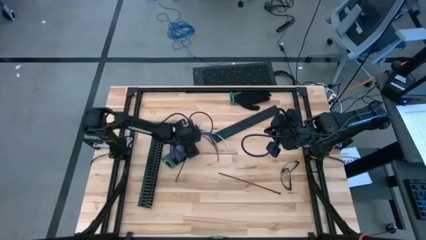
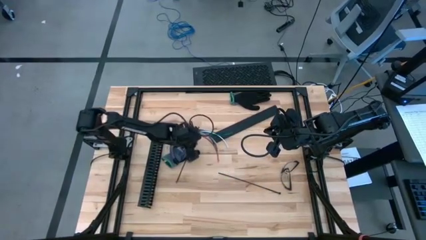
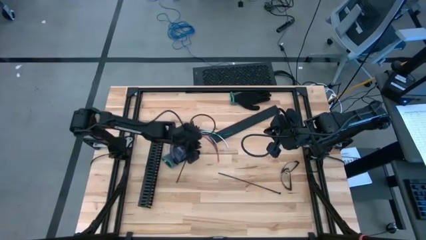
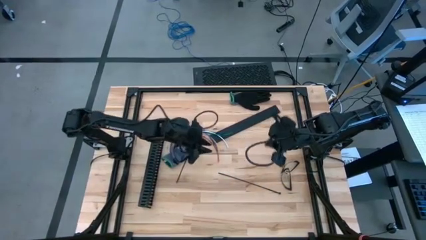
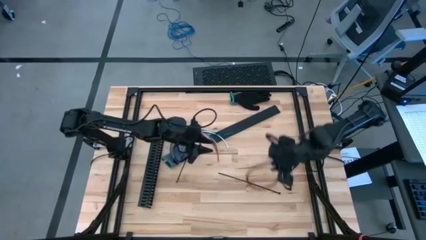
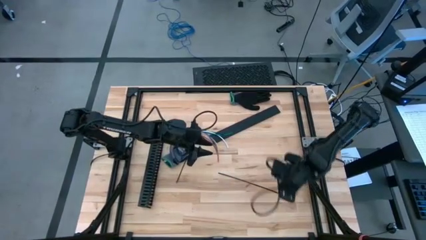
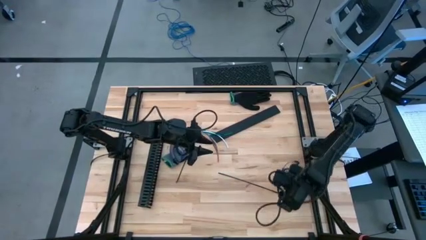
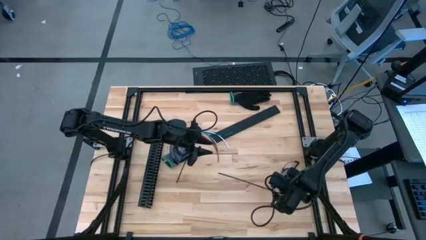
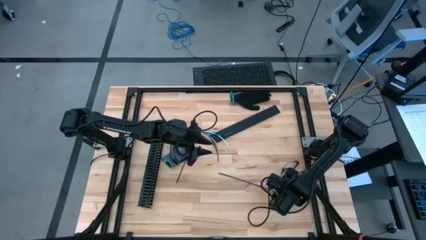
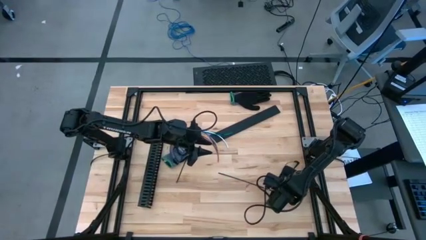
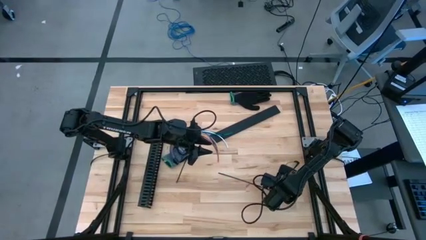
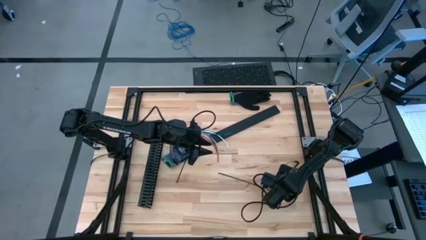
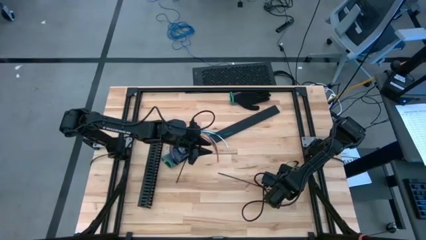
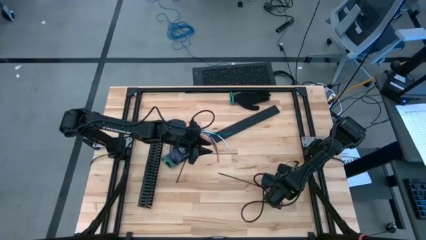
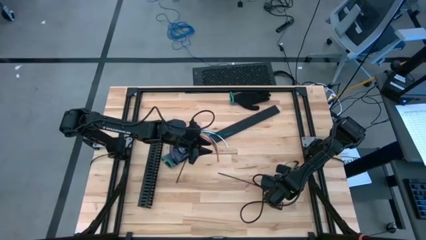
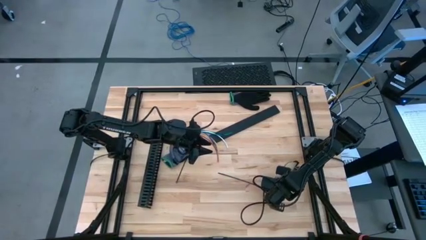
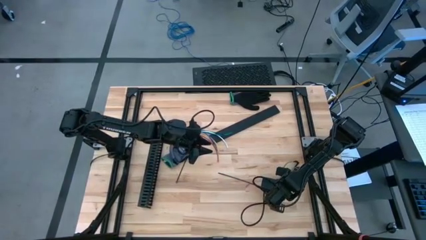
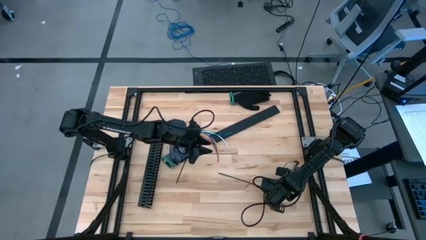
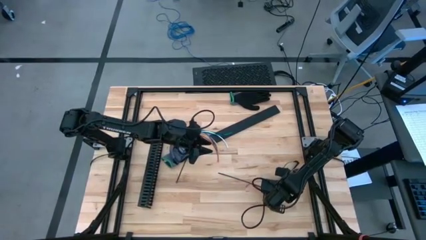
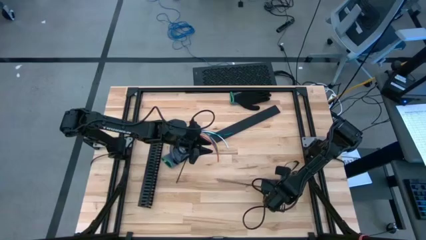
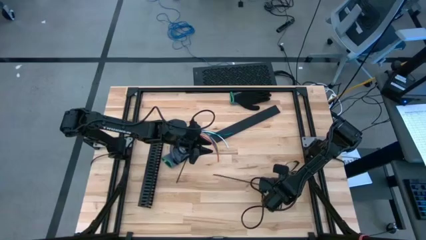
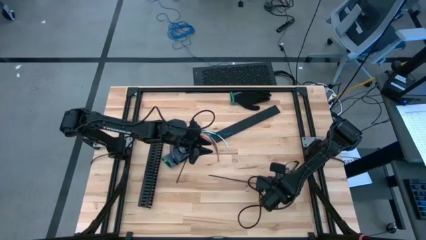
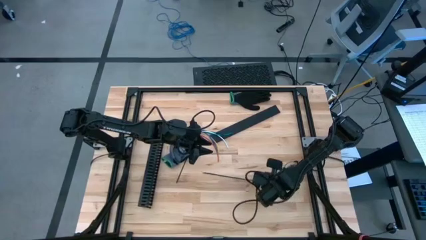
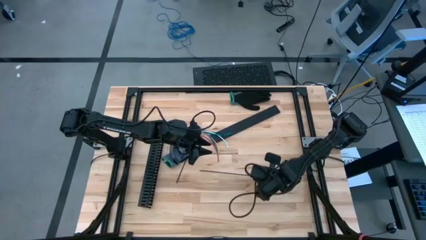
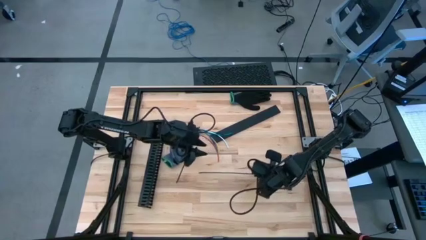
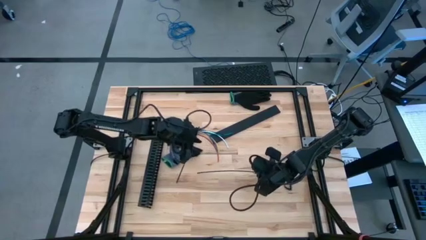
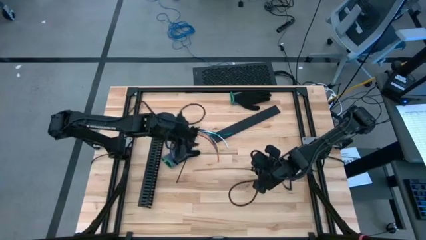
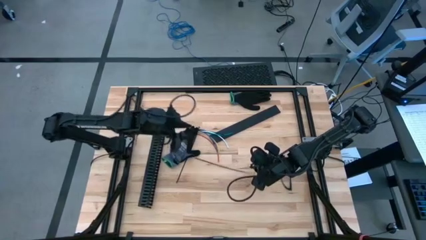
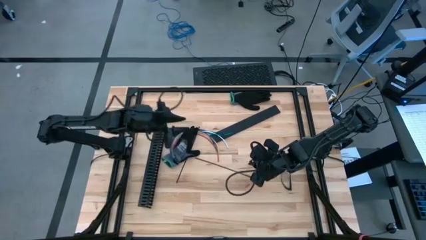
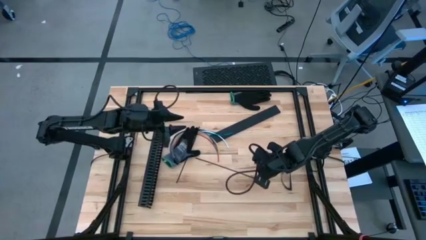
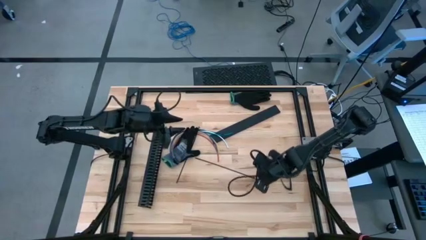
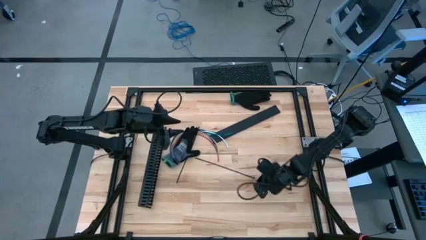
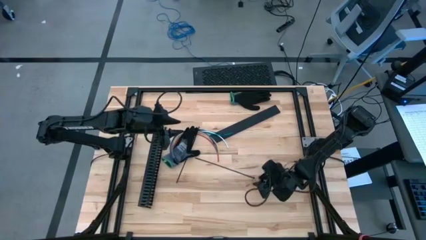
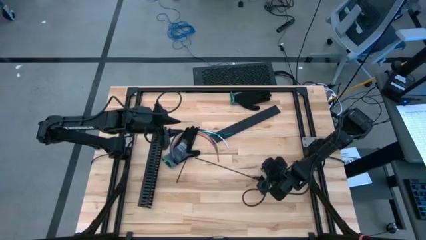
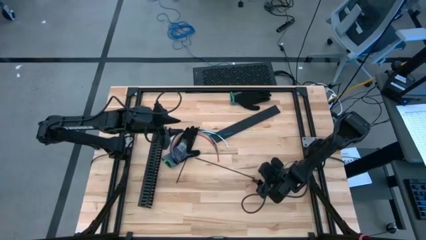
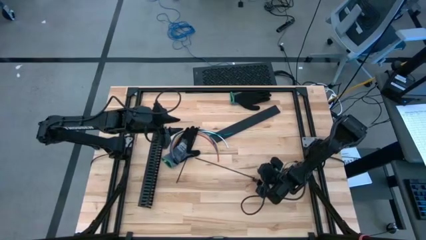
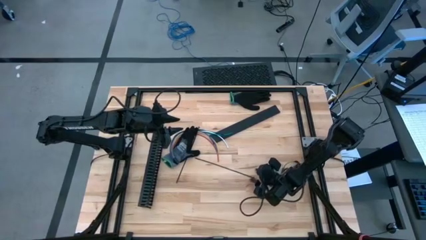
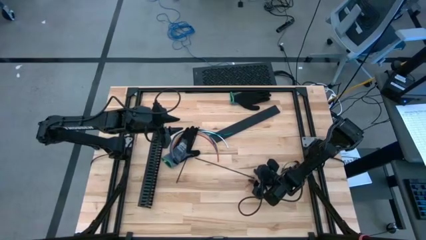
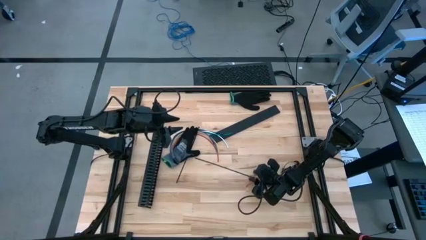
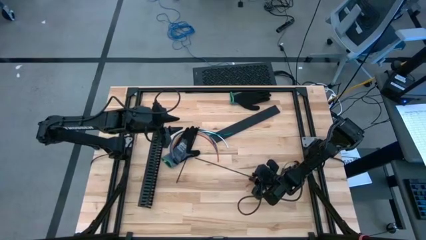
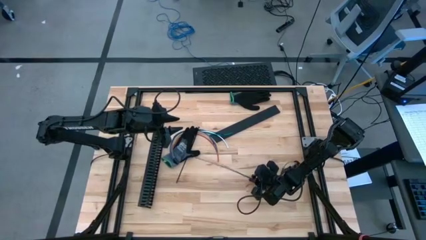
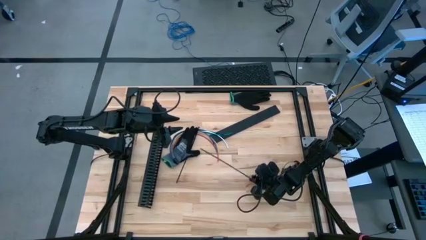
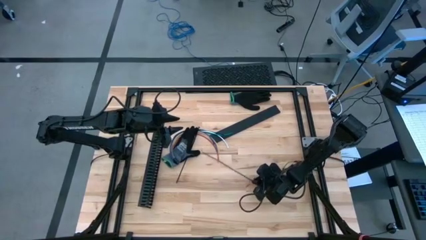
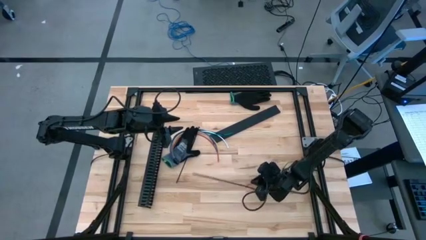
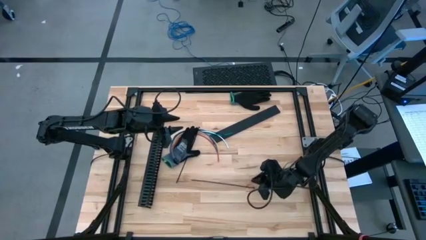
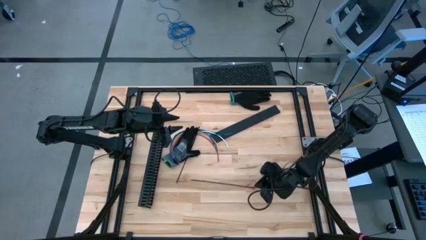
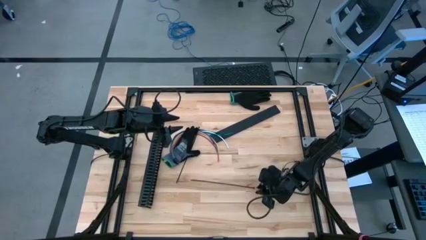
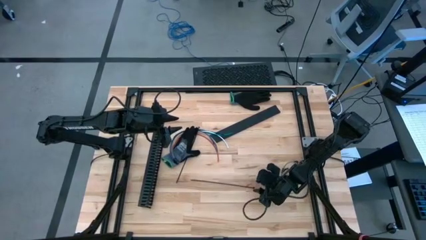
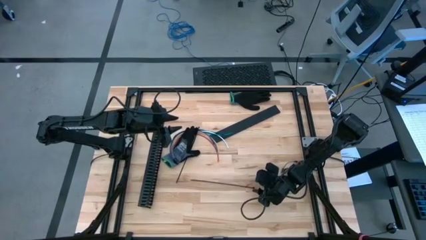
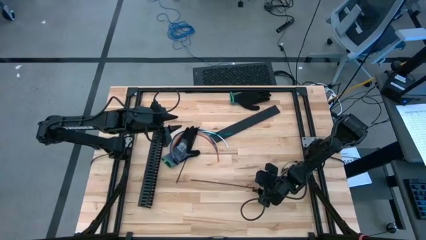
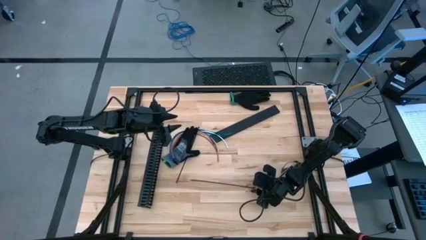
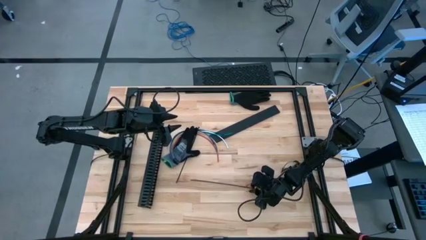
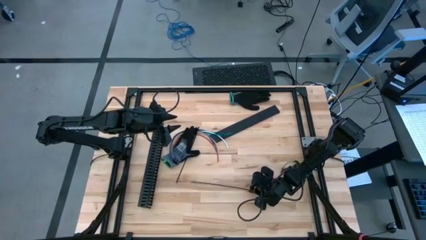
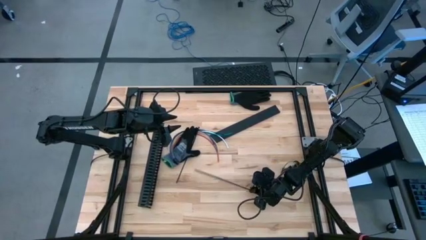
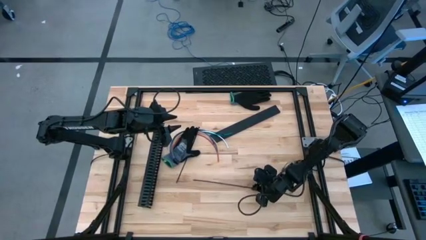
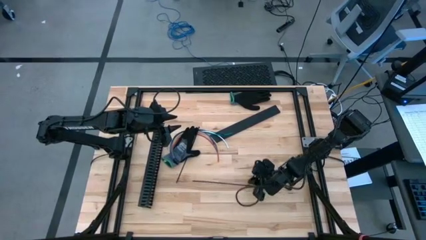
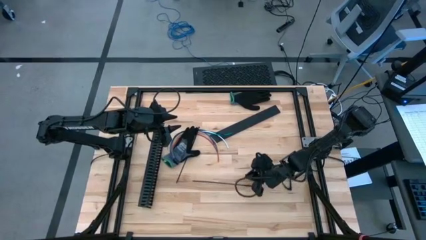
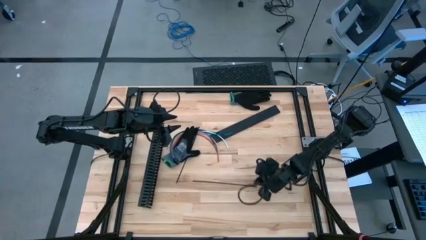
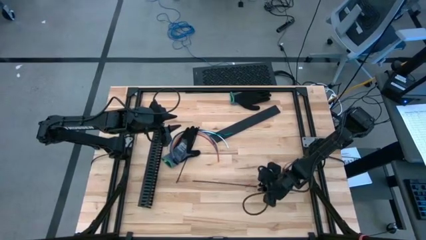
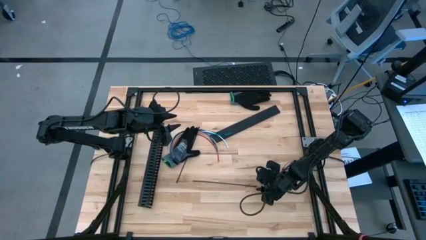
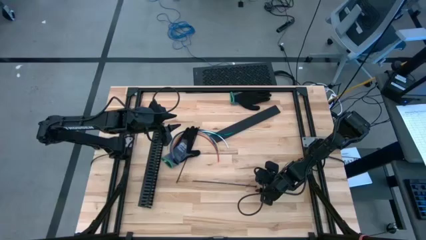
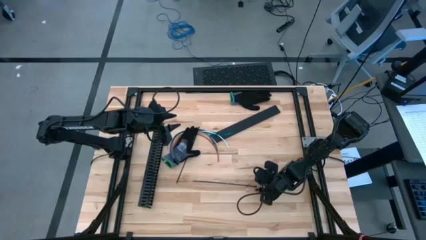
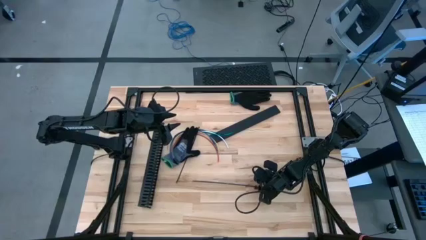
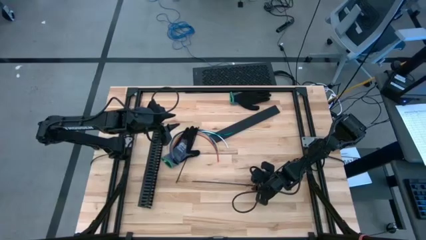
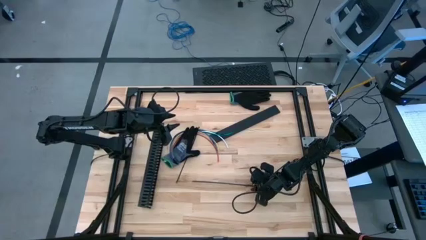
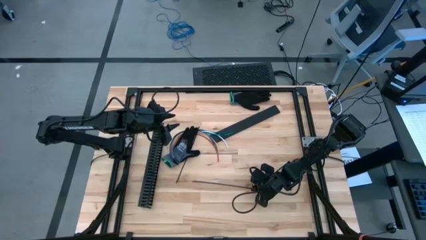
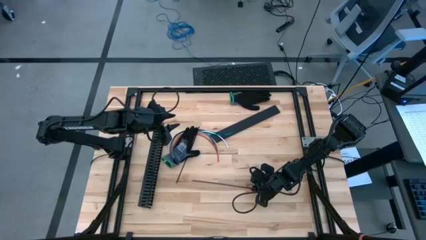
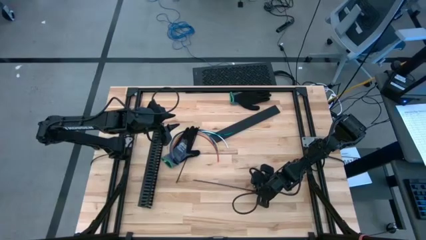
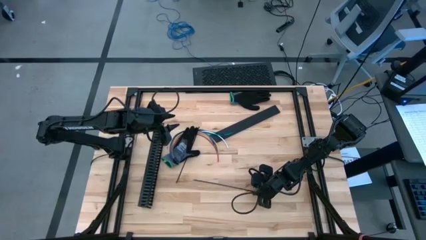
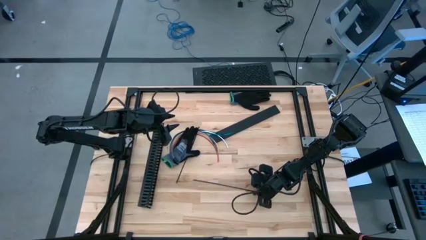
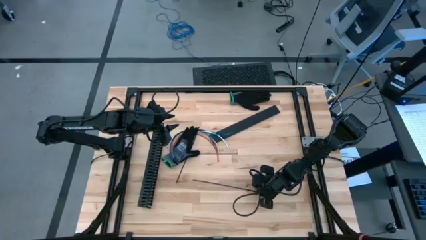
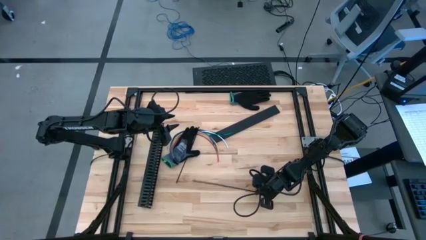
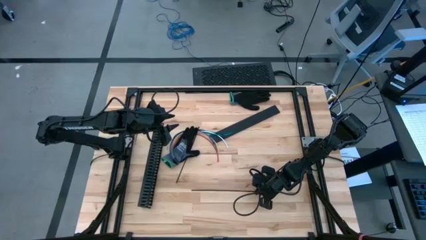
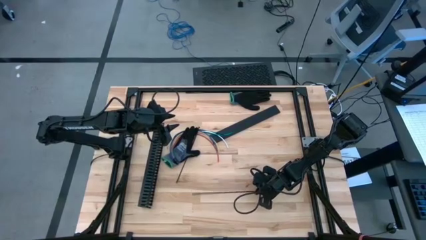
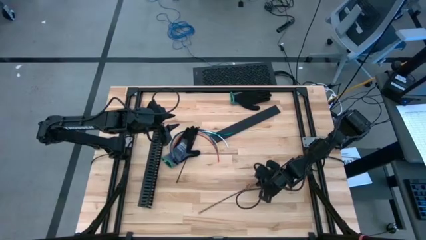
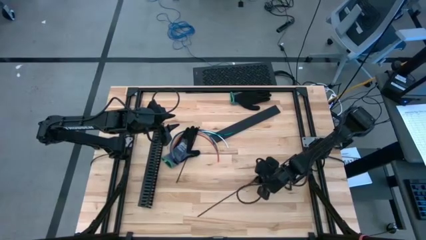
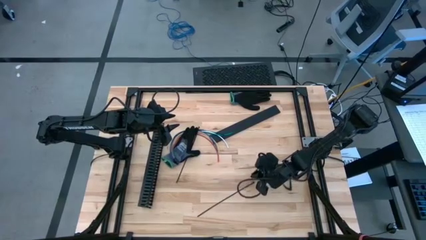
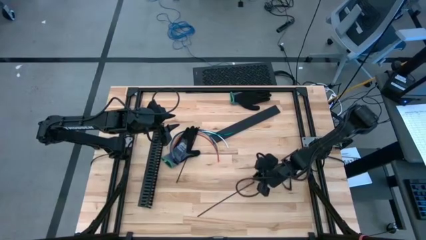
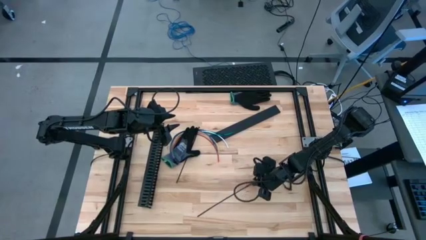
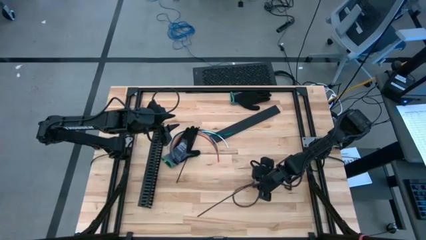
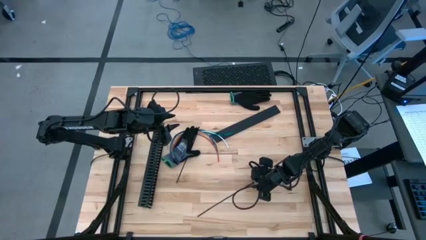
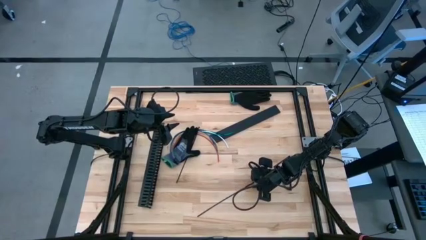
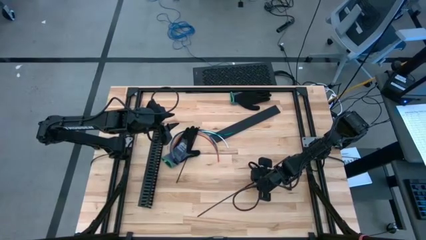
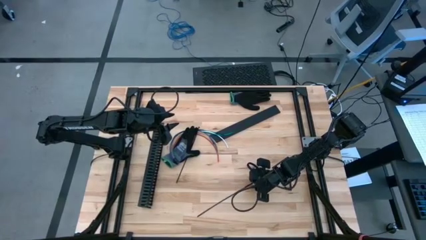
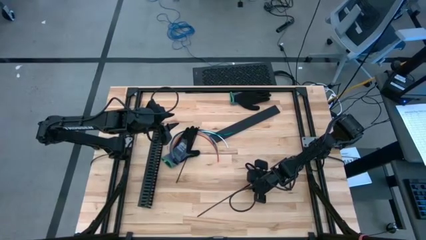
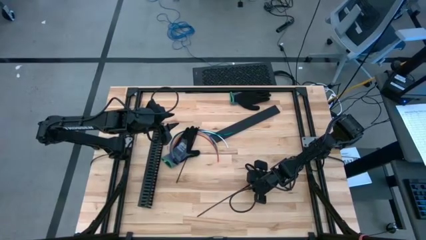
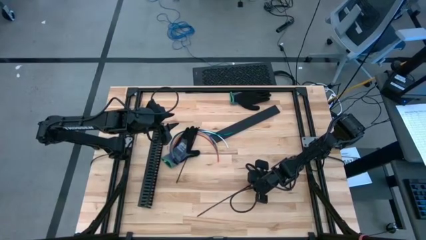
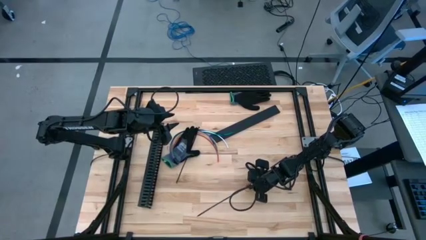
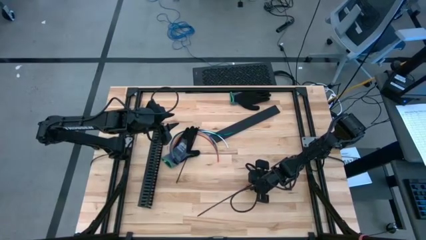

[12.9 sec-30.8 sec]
Task: Ziptie cables
Wrap the cable wires with the black zip tie
